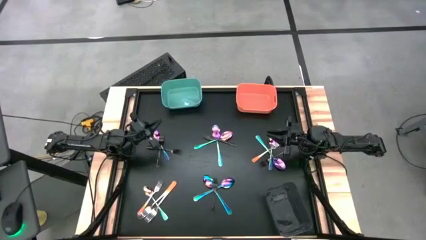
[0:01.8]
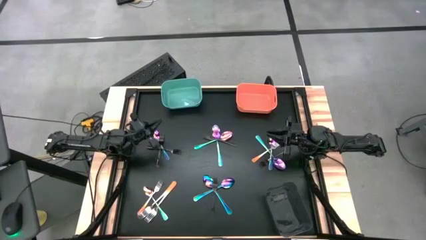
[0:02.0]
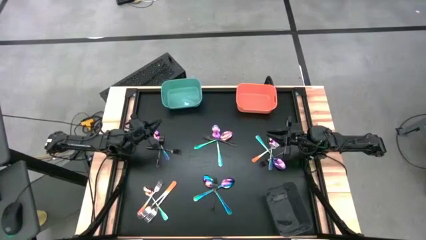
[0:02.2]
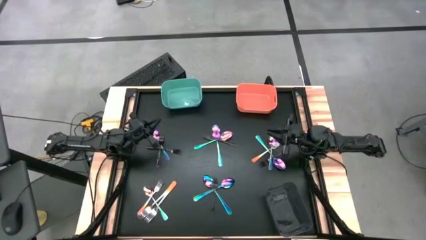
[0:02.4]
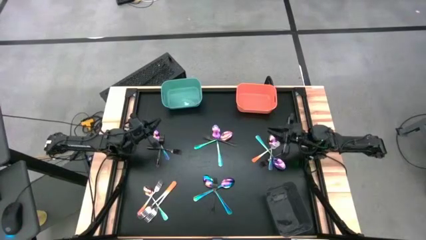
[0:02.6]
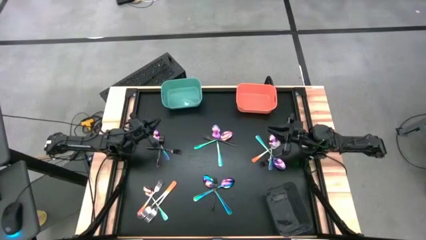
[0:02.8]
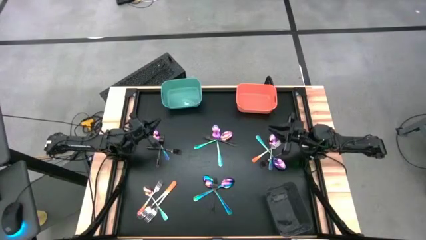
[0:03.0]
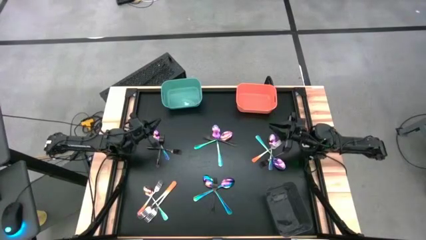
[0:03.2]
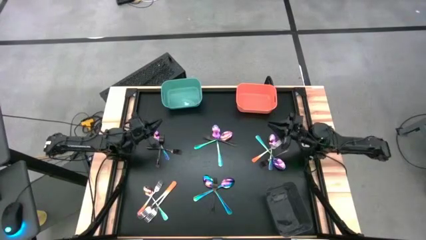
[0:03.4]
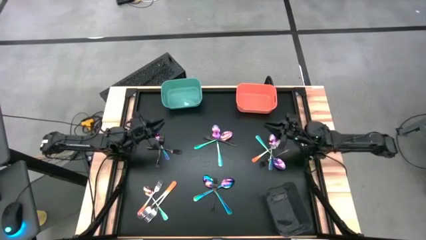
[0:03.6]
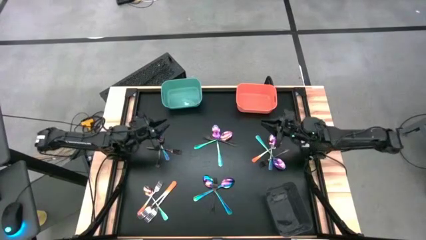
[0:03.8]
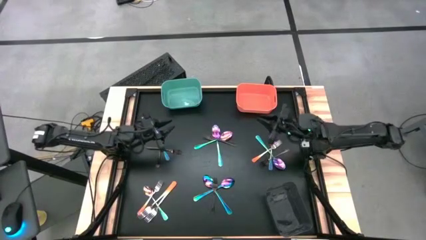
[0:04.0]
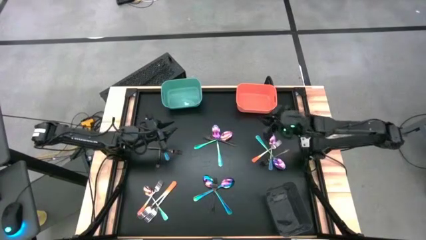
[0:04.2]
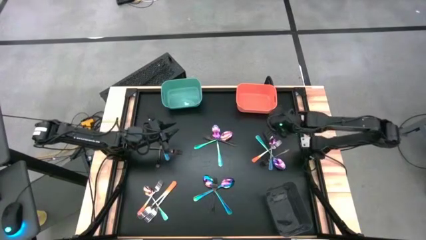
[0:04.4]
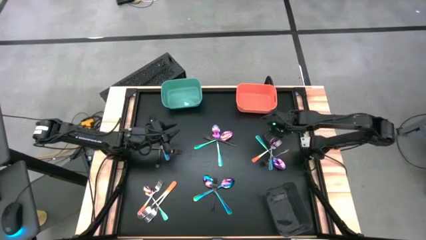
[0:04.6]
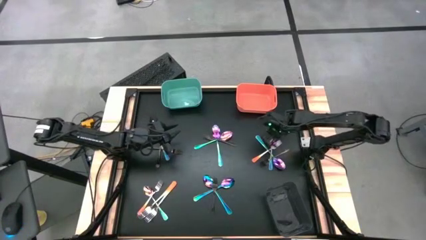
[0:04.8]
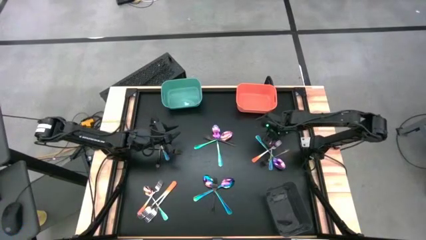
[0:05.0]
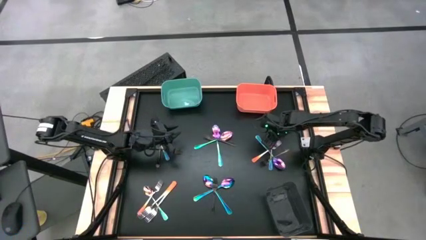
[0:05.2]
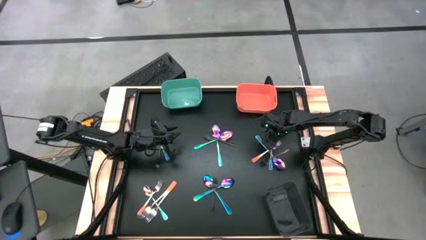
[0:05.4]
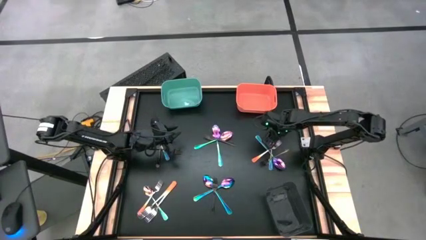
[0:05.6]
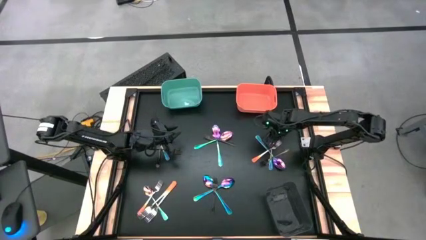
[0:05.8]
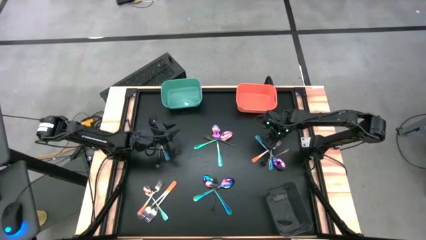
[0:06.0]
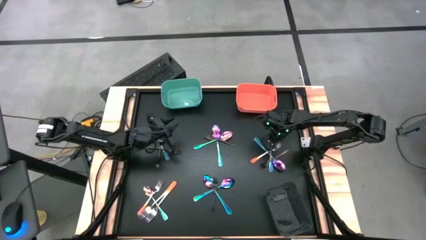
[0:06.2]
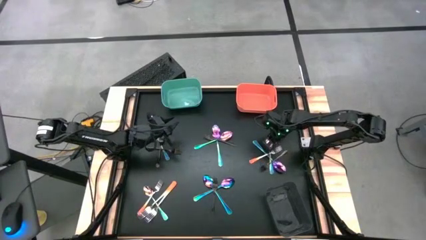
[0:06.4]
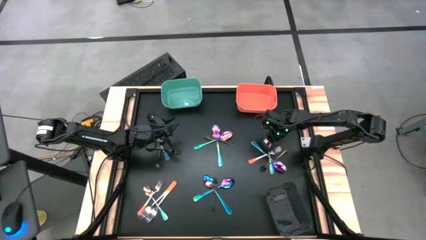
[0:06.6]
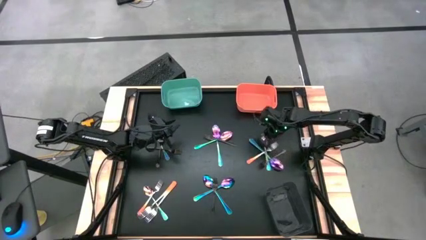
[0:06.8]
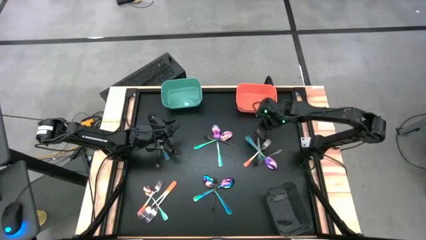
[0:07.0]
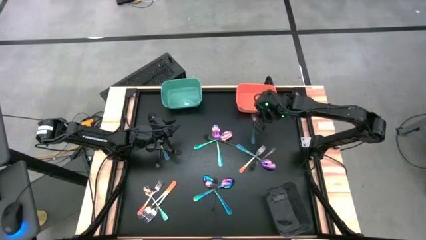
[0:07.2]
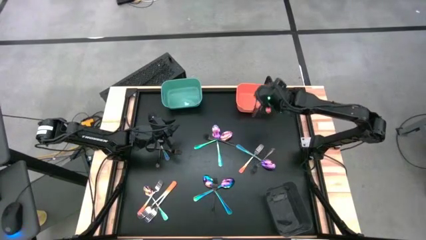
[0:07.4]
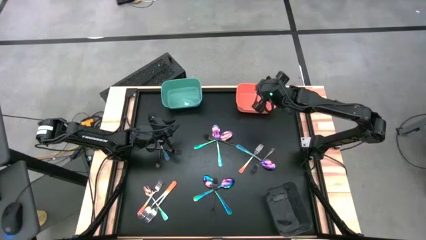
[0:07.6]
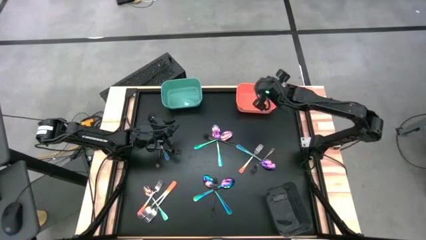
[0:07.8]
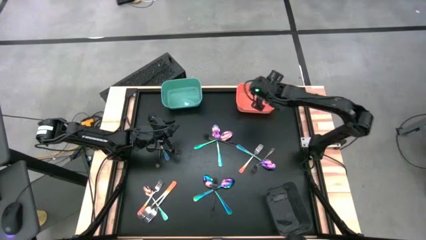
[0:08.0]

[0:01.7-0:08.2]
Task: Sort silverware by color (type)
Put the purple spoon into the orange bin

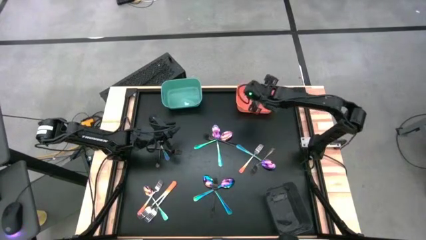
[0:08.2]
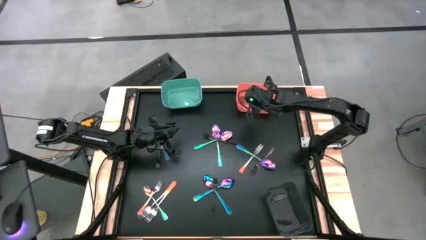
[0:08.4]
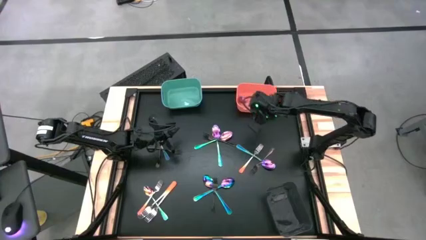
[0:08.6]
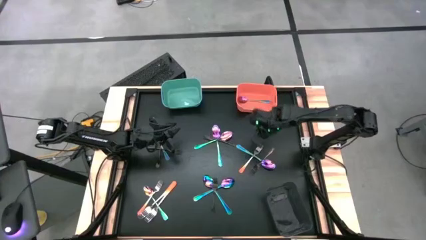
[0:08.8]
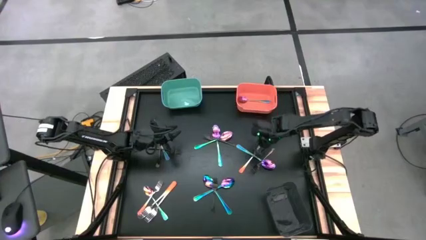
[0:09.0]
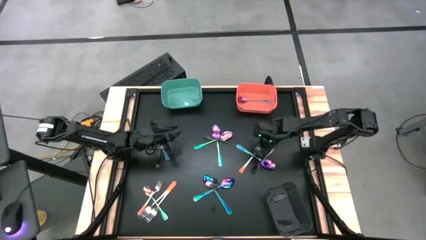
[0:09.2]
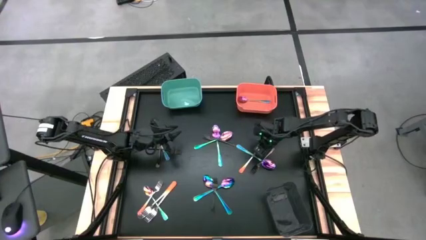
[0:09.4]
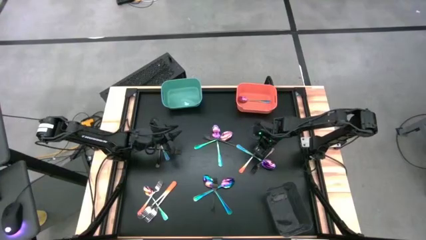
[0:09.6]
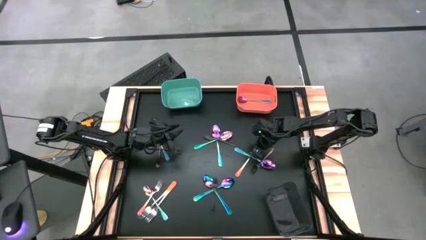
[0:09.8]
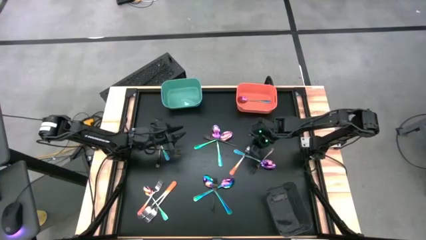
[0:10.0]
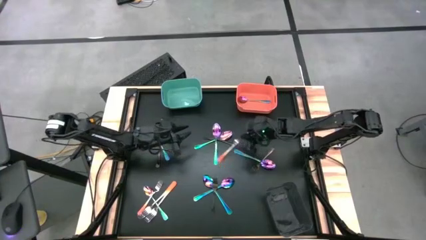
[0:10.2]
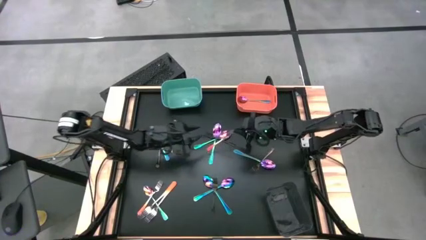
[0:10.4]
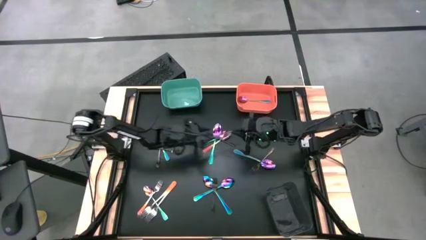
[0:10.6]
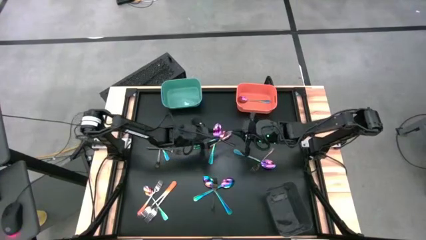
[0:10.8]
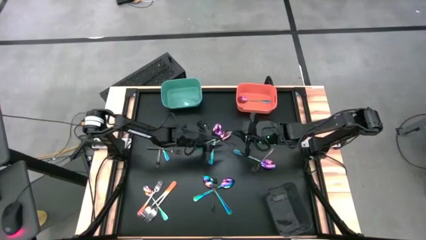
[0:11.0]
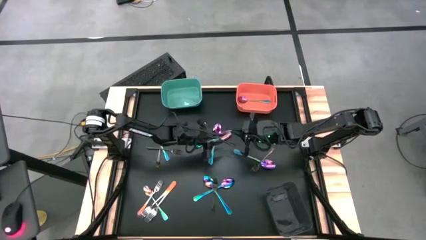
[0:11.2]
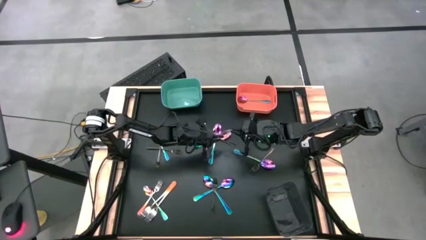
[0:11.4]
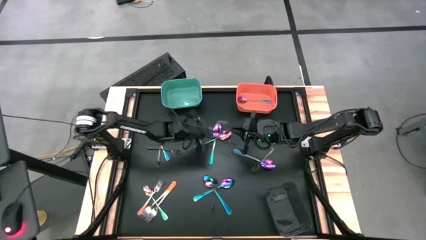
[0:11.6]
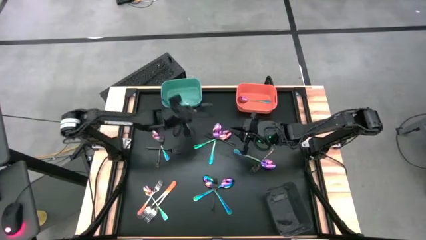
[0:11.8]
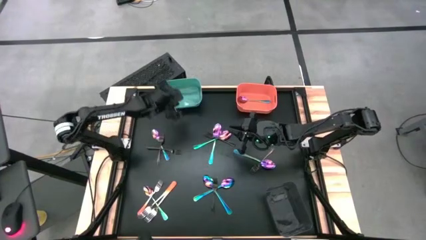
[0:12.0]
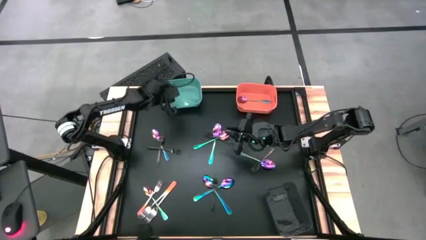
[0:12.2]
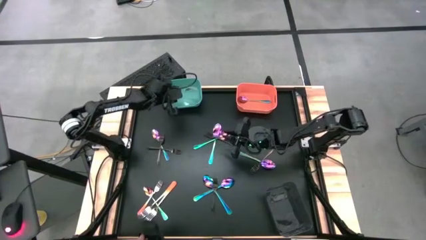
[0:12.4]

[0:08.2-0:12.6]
Put the orange fork into the green bin

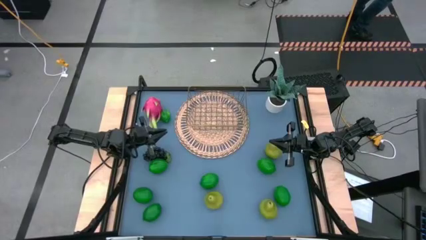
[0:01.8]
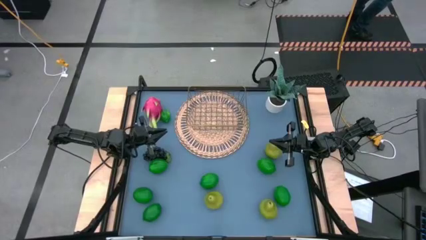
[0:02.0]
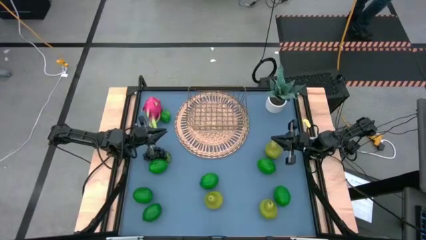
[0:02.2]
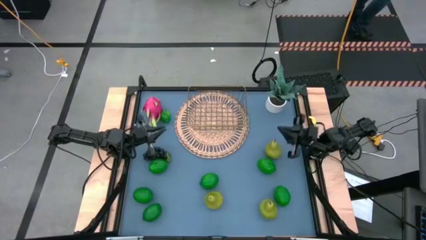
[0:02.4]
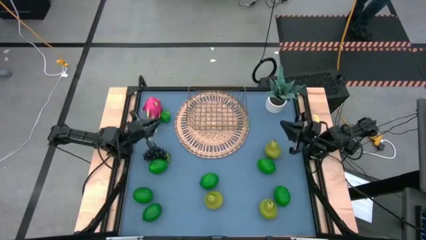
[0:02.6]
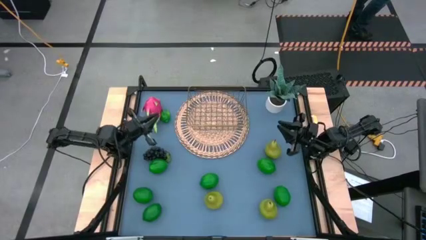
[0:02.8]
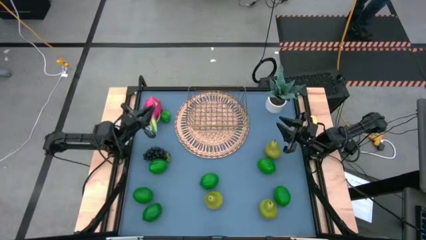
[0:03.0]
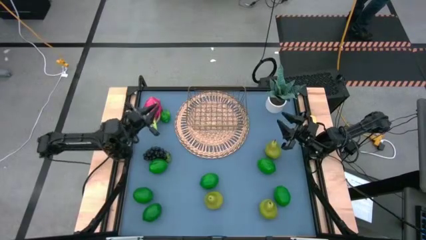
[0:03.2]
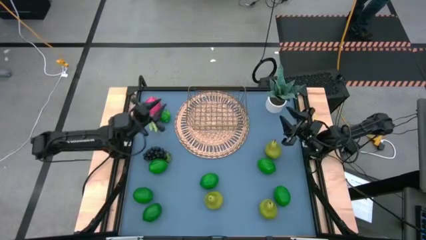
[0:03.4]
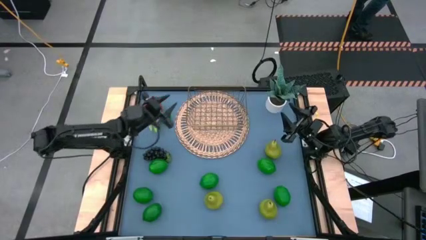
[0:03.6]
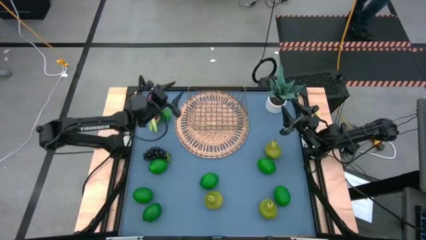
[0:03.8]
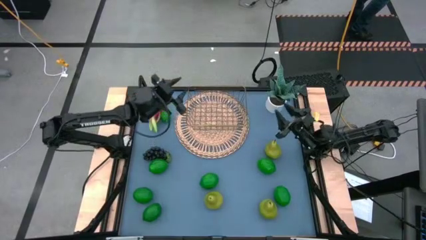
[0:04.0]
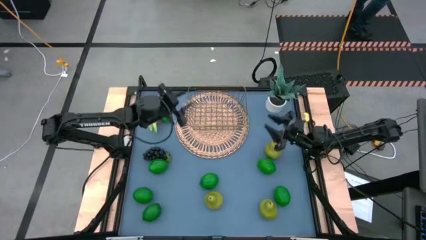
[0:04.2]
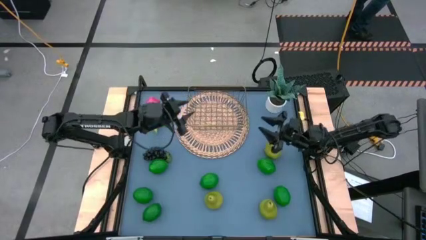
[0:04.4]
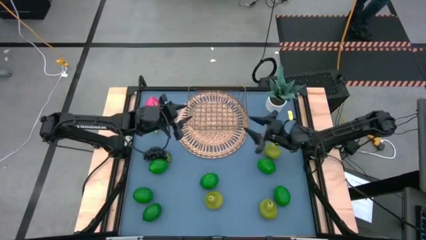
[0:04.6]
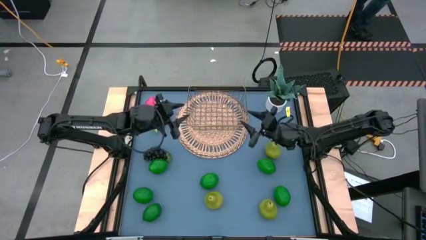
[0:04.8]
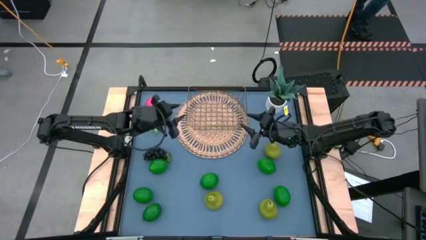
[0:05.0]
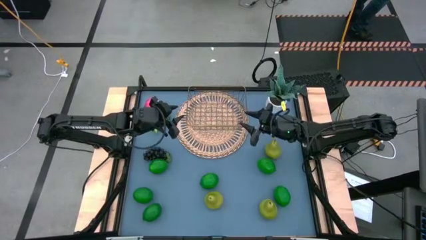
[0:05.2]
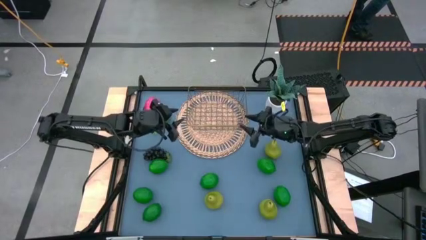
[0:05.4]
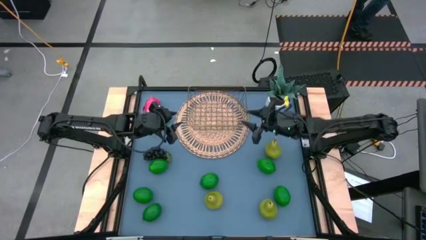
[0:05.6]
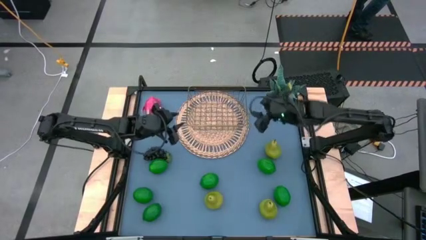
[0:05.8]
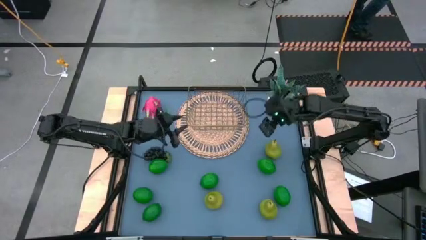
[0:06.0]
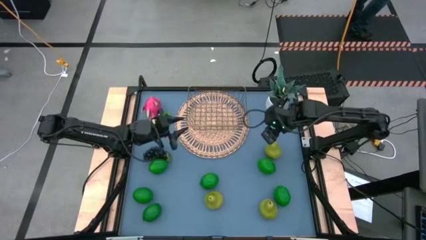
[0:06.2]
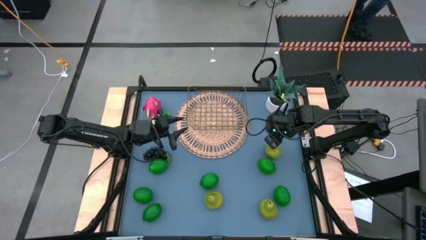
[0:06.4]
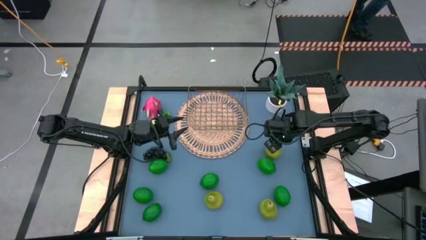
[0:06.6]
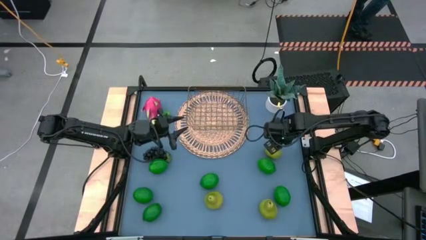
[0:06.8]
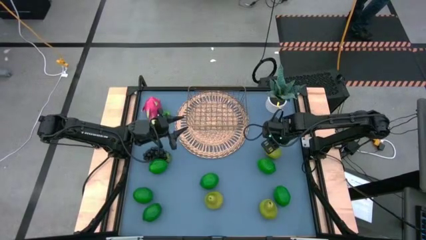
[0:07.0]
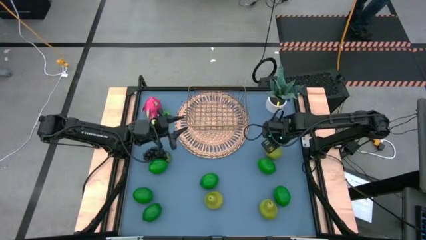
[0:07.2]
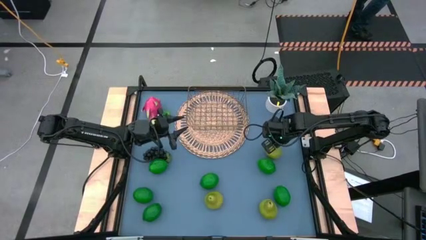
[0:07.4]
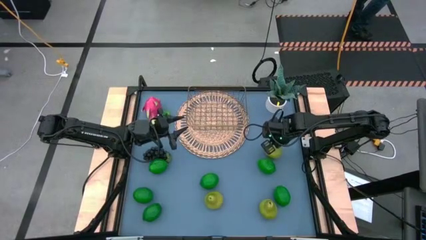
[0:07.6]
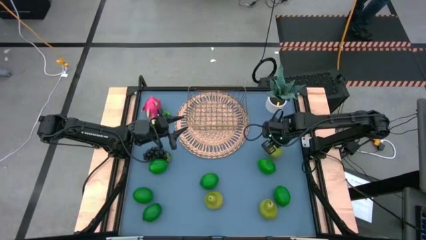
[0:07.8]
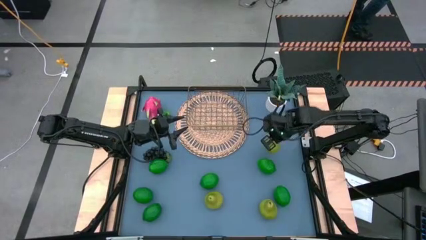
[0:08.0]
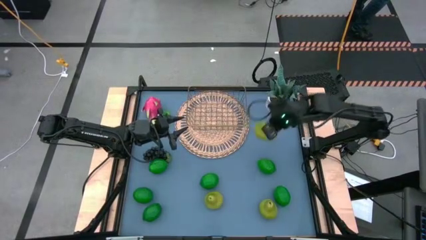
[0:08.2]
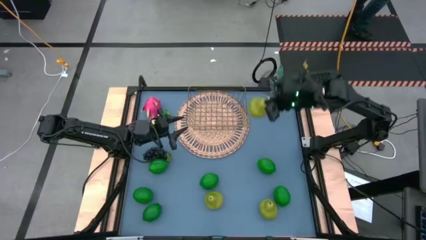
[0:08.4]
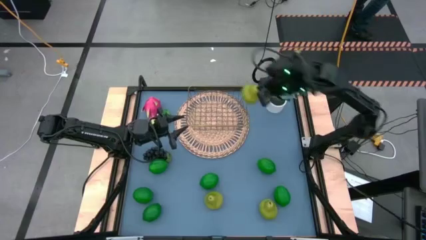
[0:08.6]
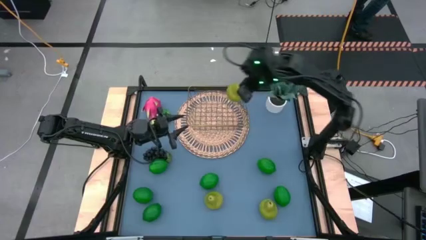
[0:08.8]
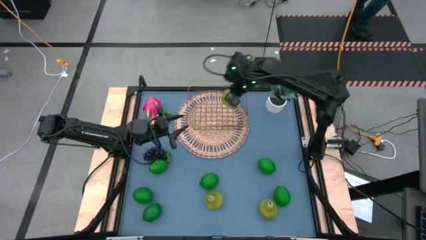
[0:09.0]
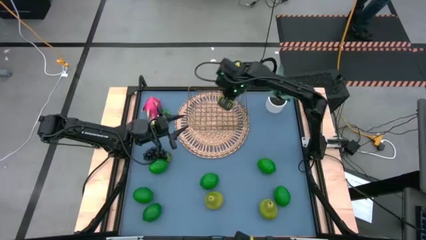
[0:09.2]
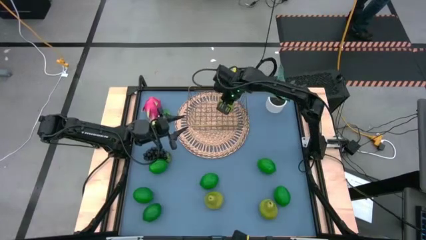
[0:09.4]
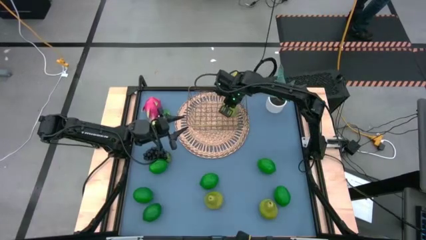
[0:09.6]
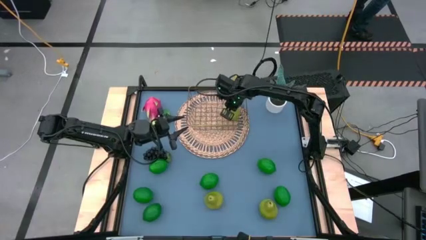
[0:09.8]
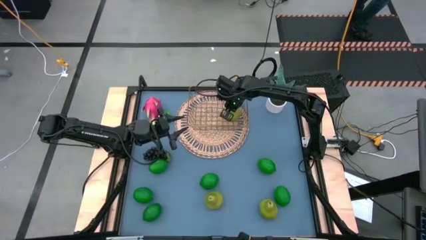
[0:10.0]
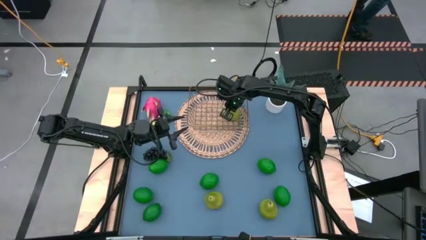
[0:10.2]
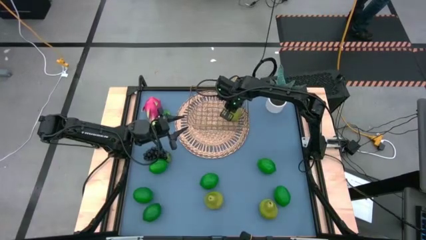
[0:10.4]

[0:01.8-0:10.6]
Task: Build produce basket
Put the green pear into the wire basket
